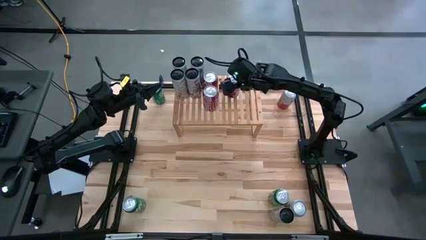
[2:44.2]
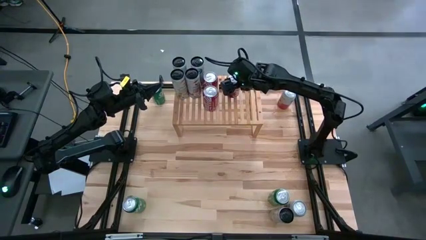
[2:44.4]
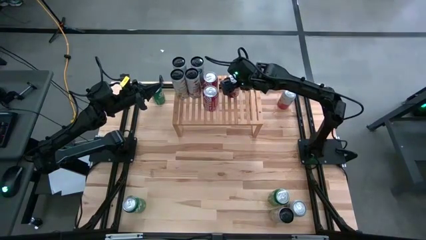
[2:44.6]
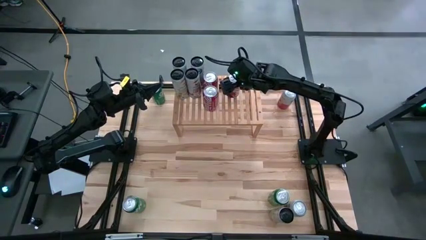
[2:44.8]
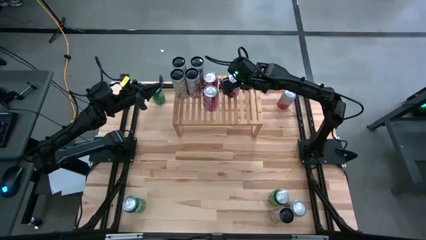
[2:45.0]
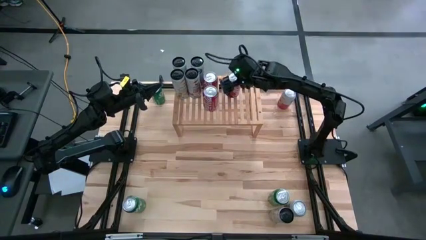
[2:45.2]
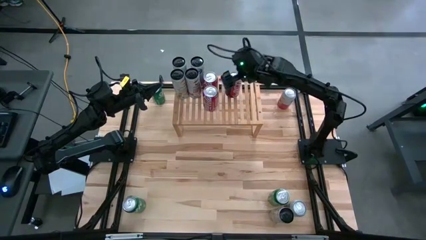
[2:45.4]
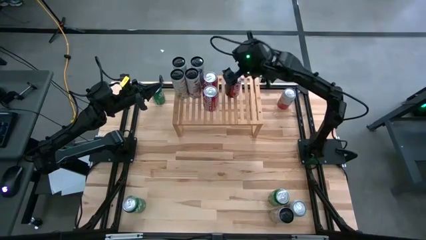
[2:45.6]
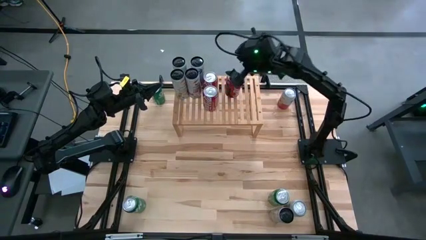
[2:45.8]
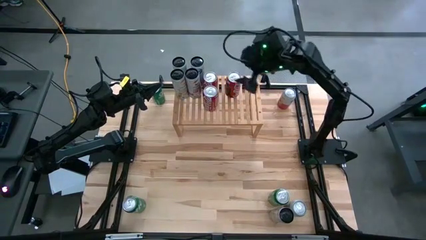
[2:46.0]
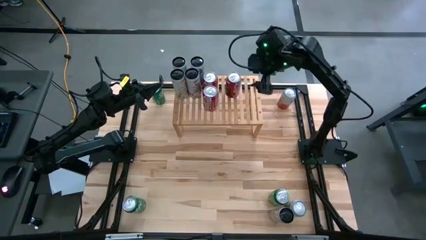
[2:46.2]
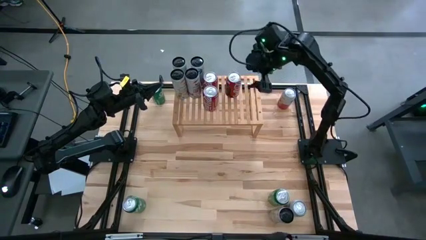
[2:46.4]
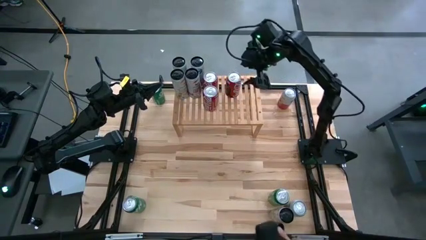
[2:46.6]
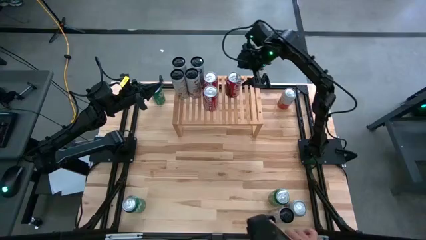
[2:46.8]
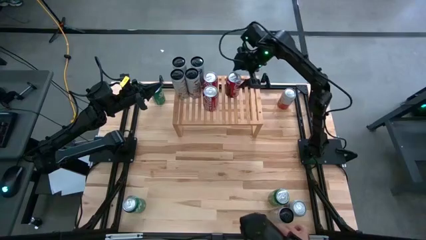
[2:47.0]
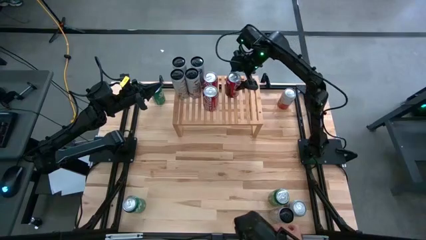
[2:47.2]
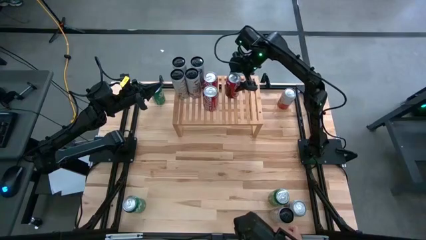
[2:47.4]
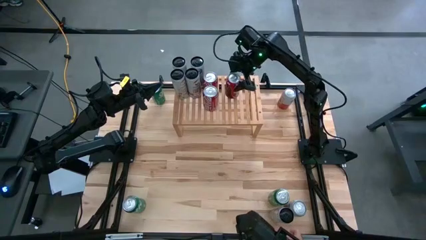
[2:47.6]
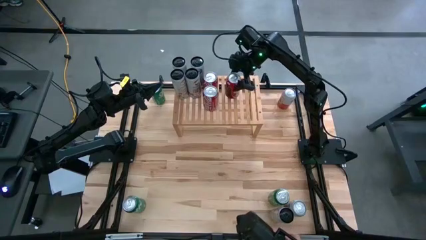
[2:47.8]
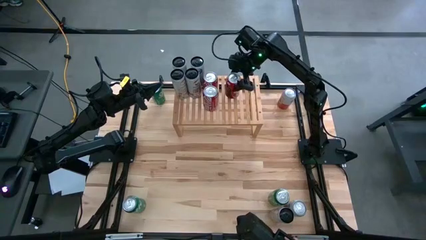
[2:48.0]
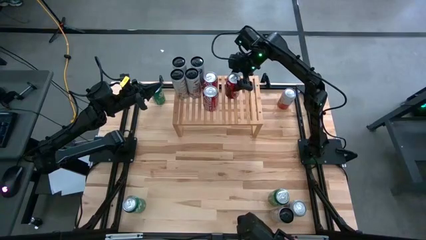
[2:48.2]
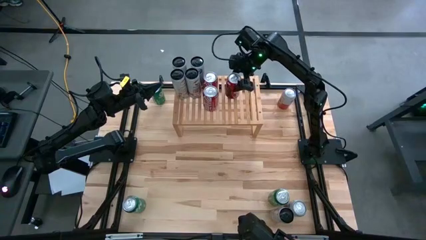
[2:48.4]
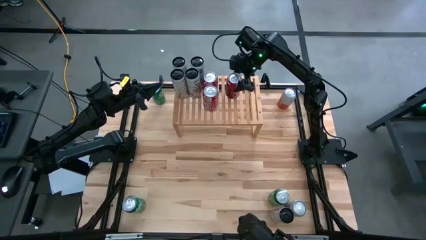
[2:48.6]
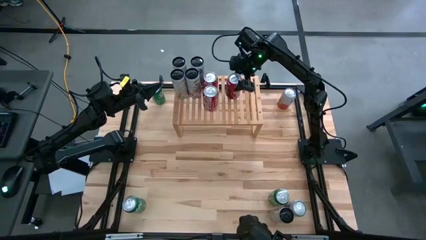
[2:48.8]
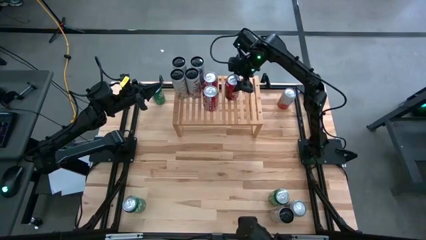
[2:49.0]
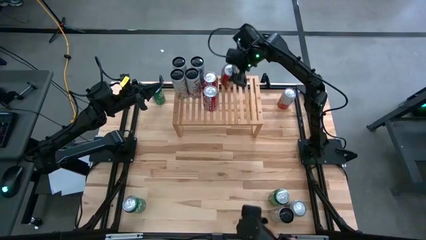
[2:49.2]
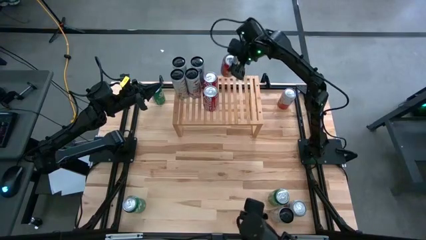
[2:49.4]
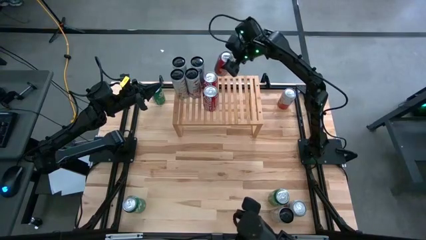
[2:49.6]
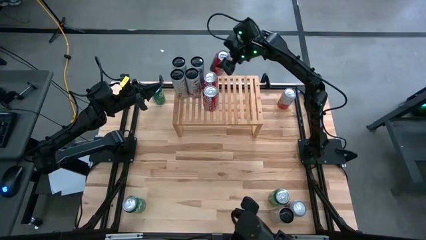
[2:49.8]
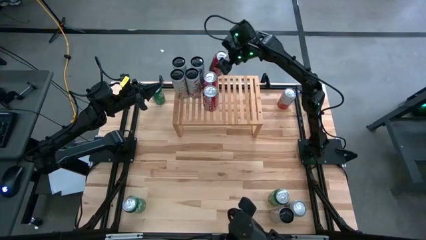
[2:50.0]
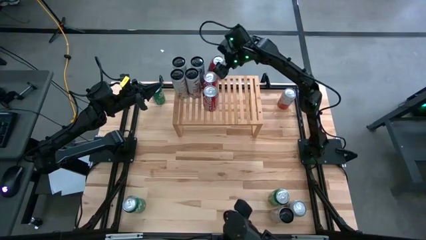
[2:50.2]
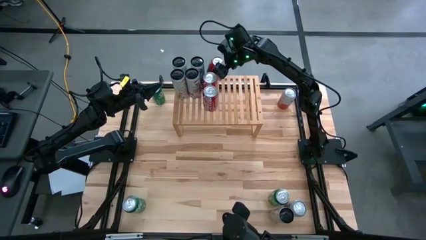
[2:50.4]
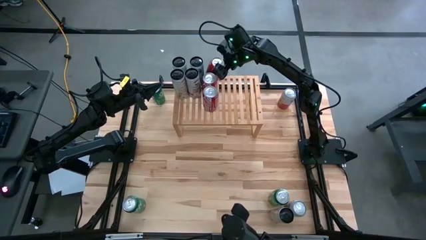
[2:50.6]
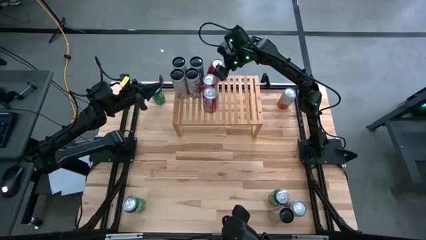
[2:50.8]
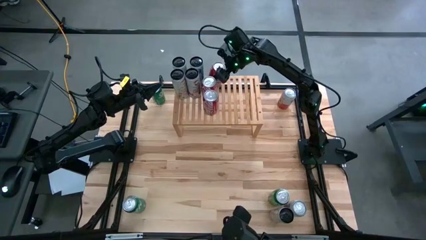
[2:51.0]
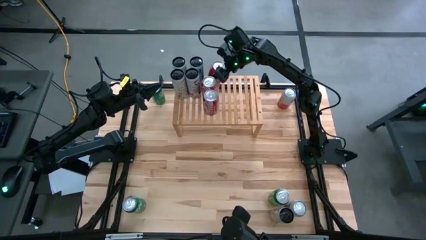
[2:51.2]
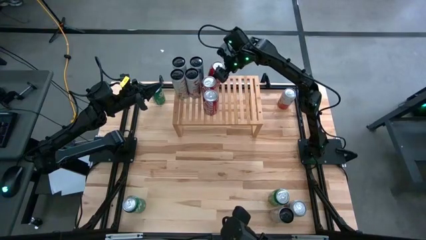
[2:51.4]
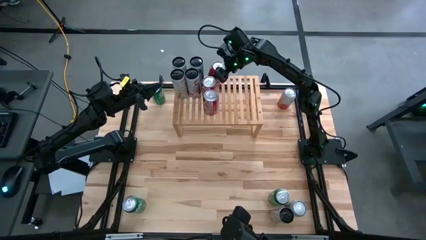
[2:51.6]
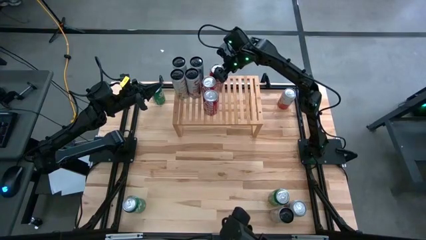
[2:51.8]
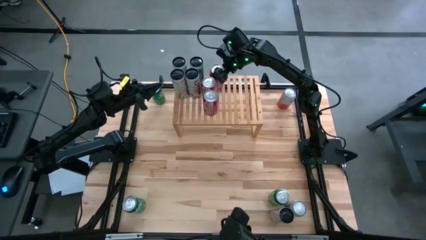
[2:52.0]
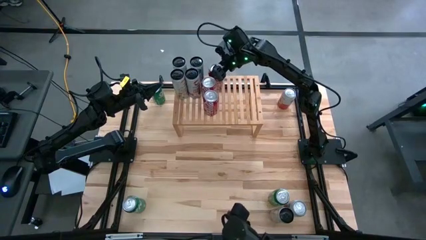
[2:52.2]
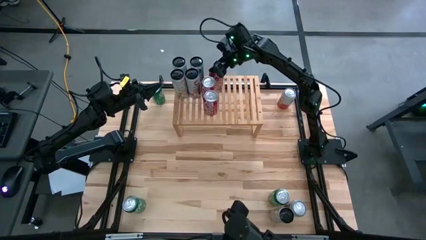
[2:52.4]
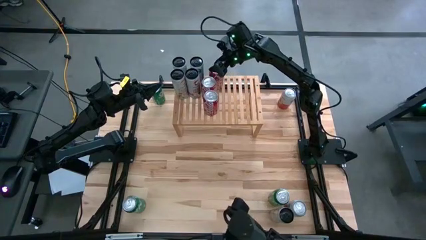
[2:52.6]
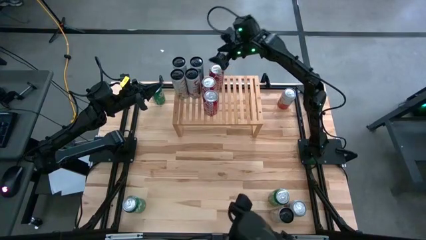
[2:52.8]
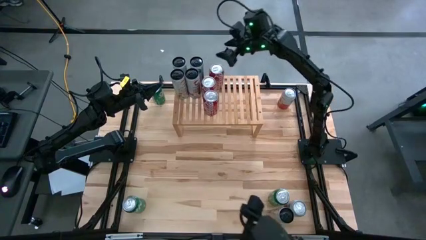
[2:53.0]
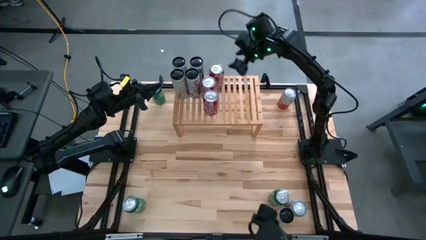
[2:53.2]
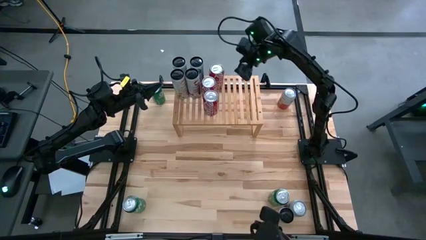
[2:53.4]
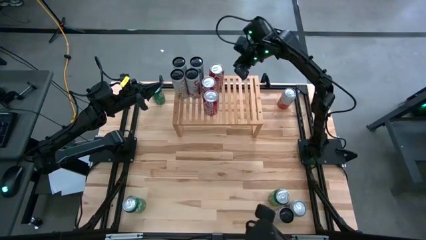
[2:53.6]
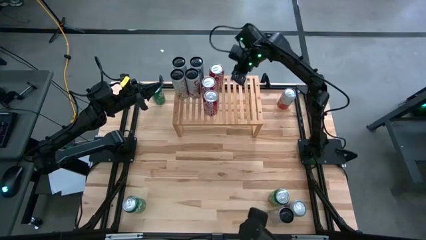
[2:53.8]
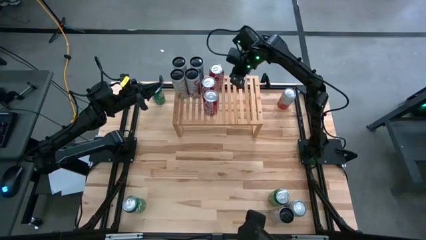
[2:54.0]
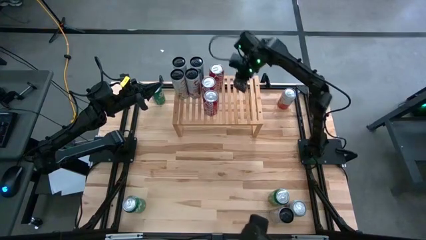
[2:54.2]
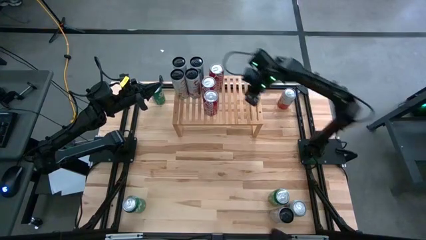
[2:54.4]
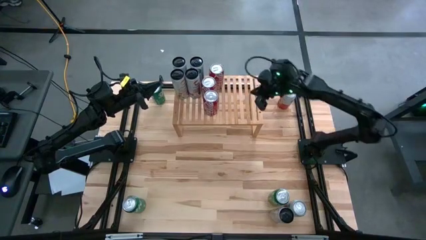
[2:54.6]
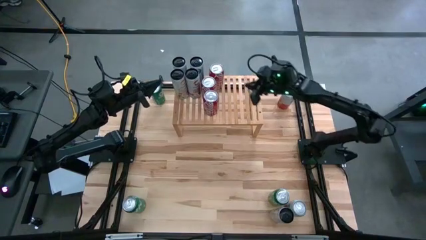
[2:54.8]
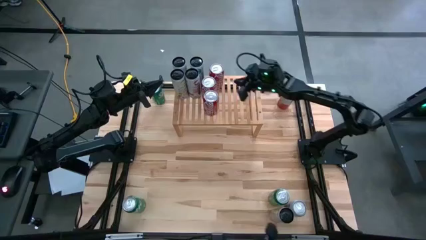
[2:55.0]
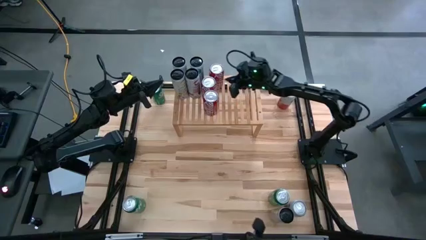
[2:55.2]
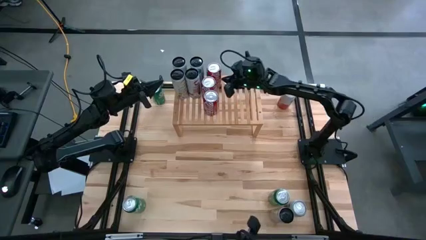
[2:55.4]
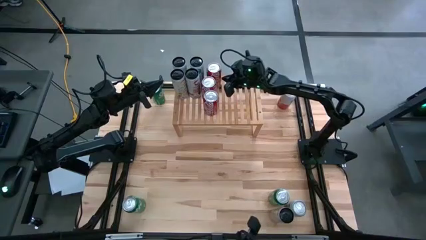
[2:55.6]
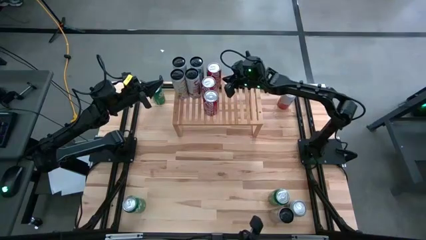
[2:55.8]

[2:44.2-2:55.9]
Task: Place canned beverage on shelf
Put the red soda can on the shelf aligned with other red soda can
